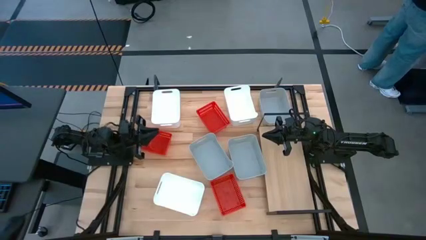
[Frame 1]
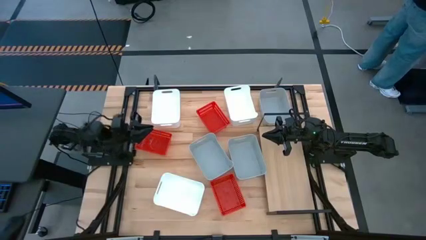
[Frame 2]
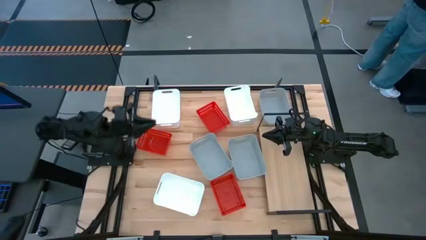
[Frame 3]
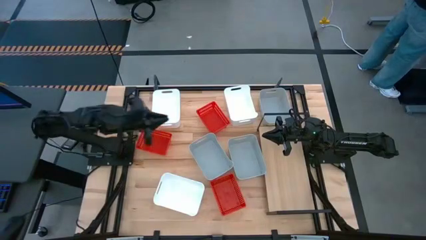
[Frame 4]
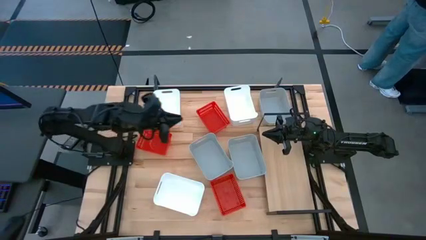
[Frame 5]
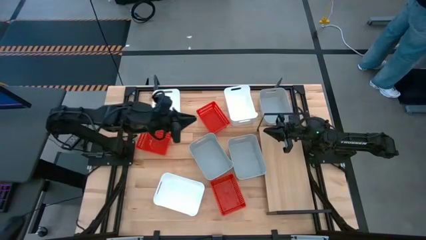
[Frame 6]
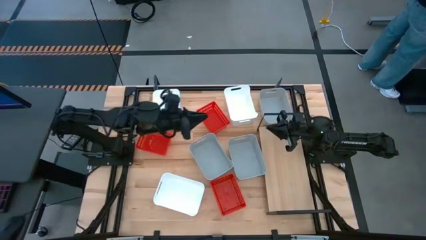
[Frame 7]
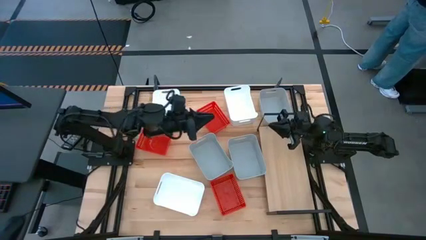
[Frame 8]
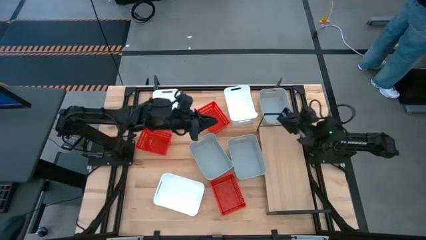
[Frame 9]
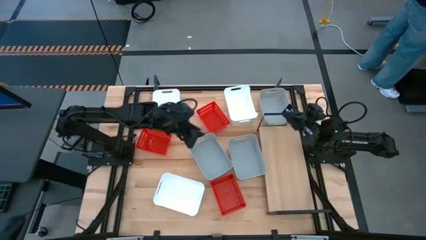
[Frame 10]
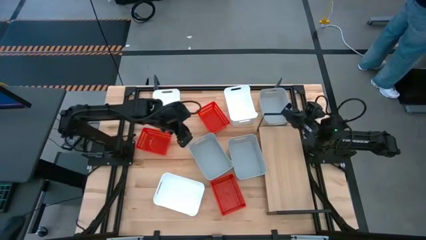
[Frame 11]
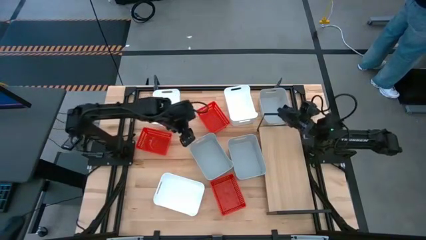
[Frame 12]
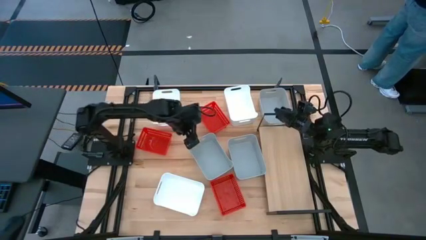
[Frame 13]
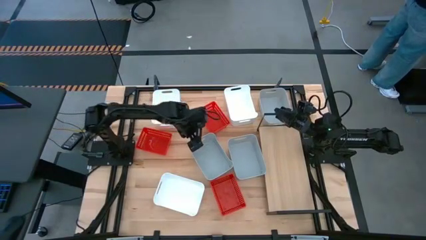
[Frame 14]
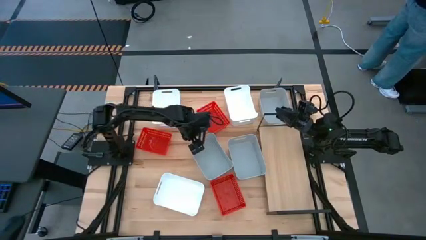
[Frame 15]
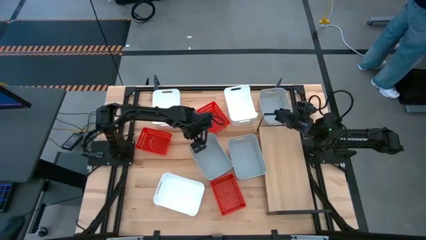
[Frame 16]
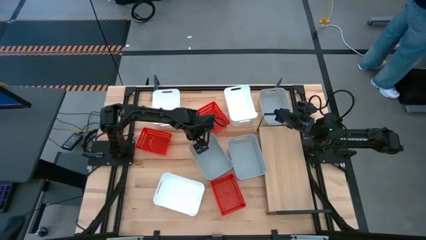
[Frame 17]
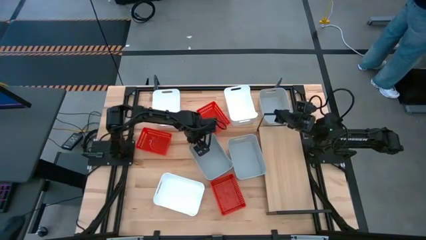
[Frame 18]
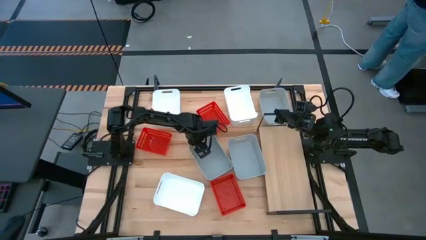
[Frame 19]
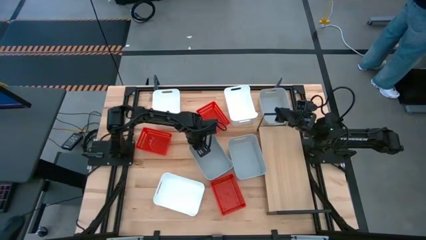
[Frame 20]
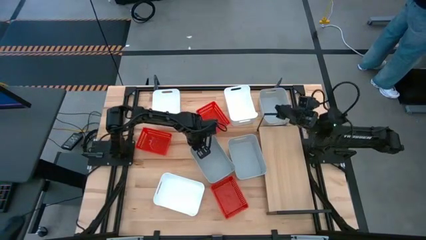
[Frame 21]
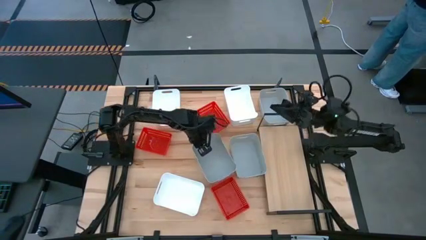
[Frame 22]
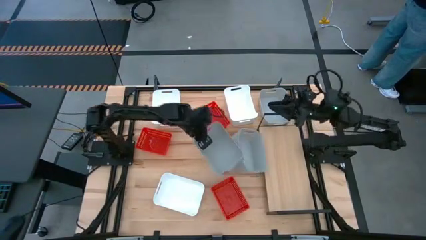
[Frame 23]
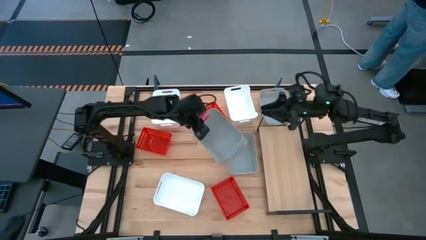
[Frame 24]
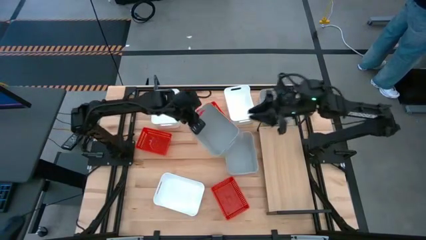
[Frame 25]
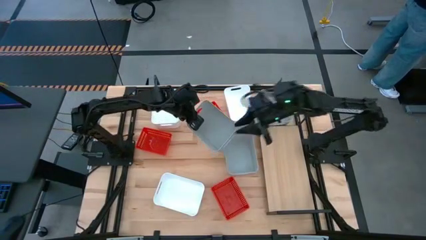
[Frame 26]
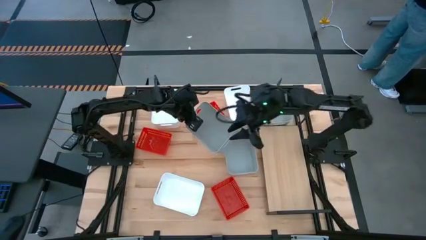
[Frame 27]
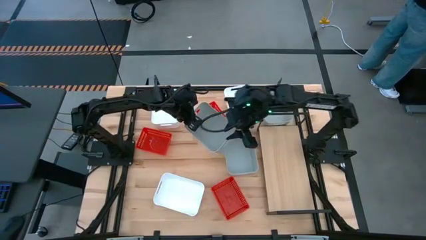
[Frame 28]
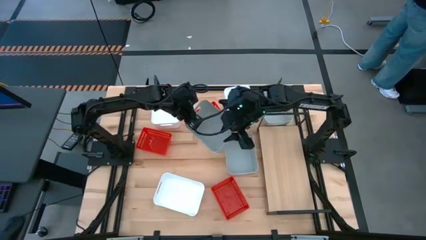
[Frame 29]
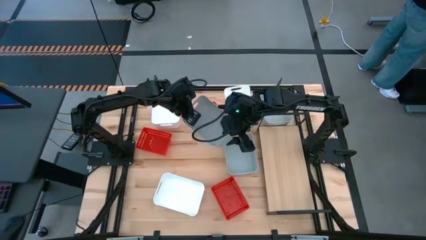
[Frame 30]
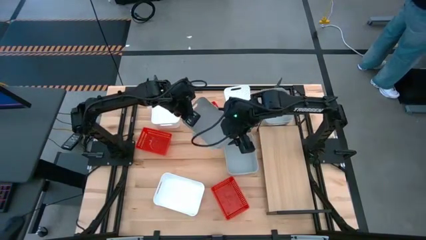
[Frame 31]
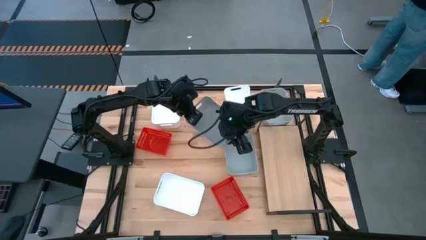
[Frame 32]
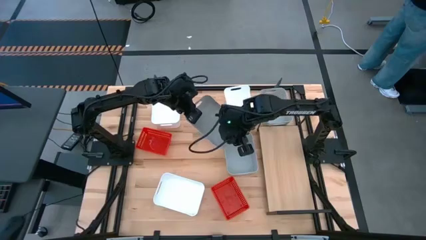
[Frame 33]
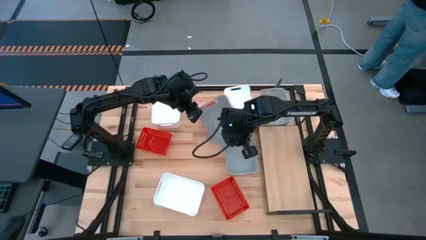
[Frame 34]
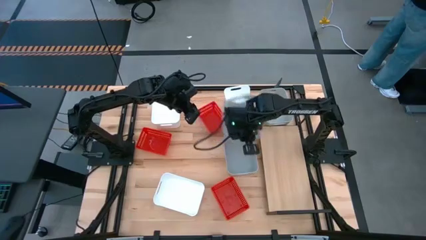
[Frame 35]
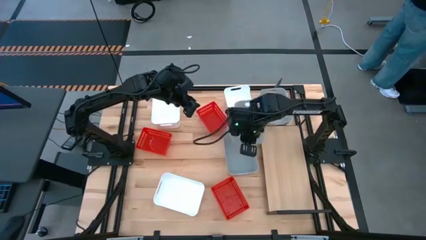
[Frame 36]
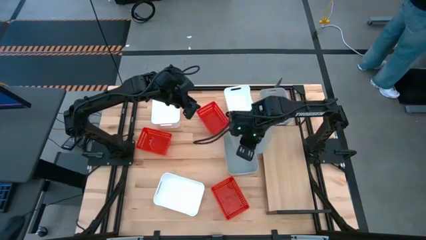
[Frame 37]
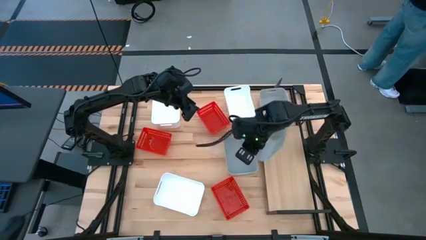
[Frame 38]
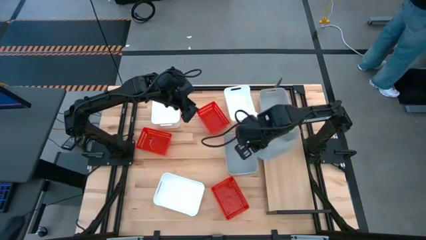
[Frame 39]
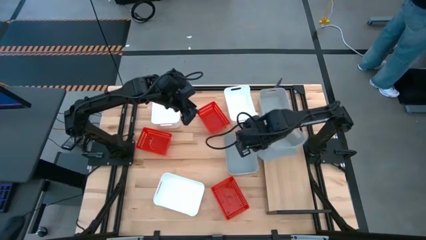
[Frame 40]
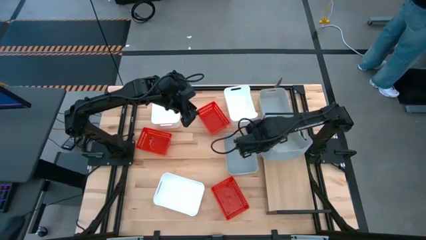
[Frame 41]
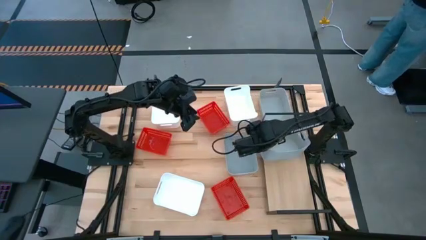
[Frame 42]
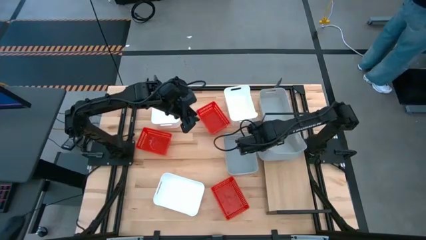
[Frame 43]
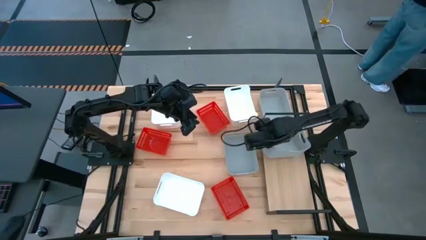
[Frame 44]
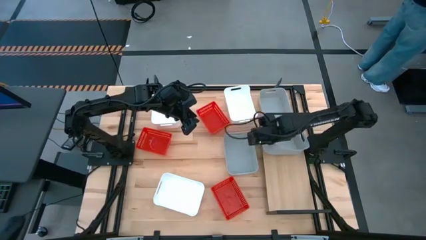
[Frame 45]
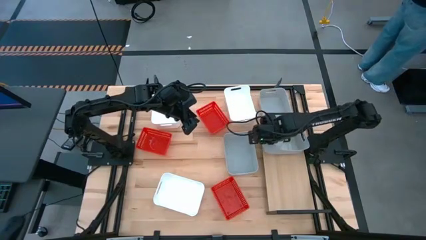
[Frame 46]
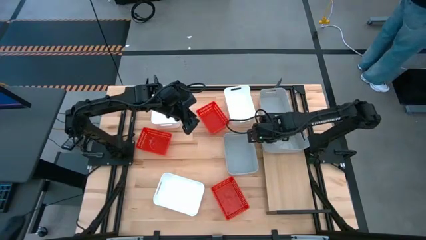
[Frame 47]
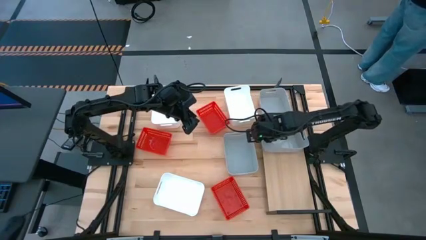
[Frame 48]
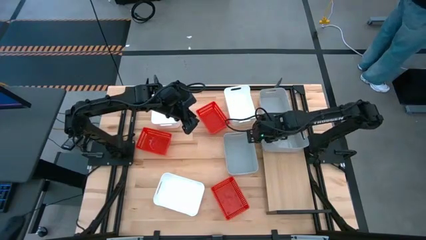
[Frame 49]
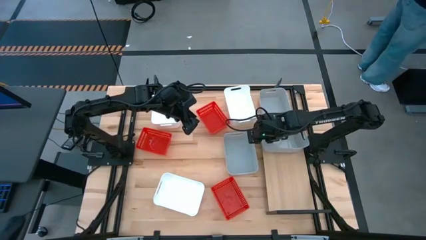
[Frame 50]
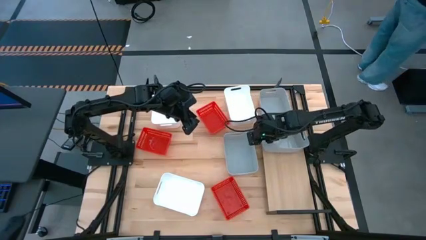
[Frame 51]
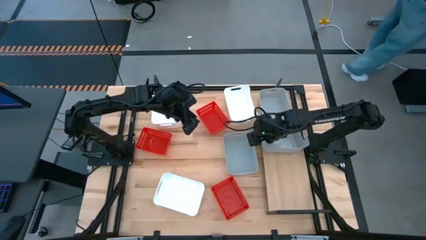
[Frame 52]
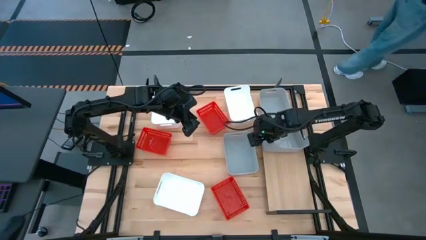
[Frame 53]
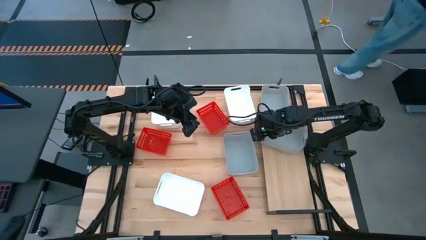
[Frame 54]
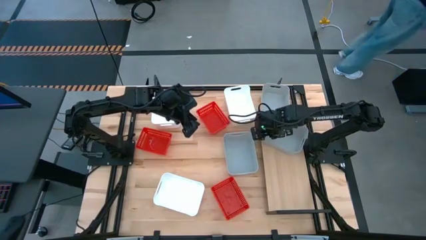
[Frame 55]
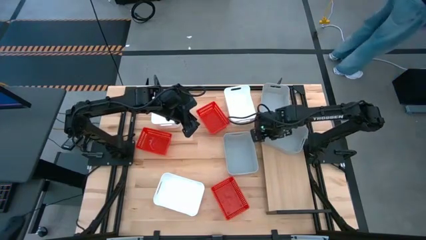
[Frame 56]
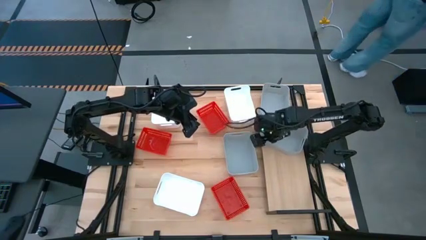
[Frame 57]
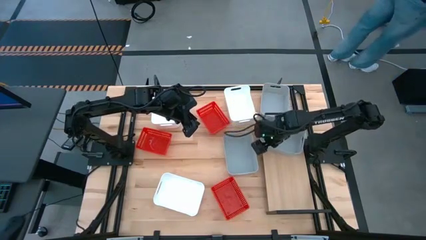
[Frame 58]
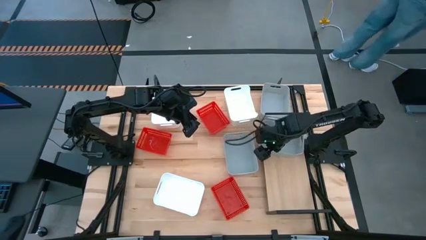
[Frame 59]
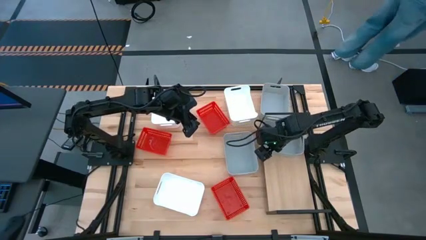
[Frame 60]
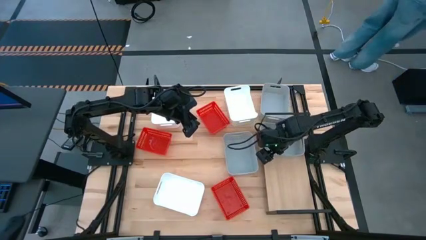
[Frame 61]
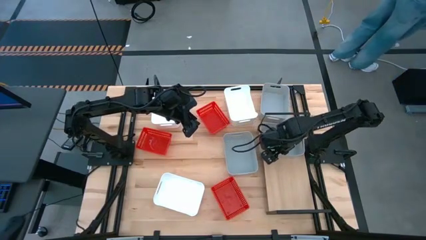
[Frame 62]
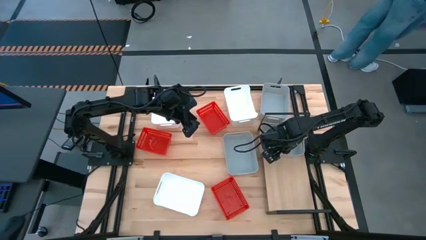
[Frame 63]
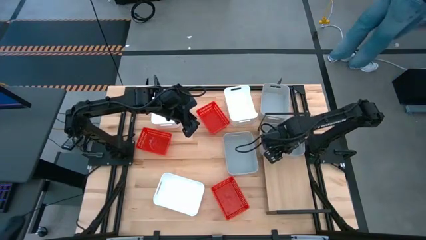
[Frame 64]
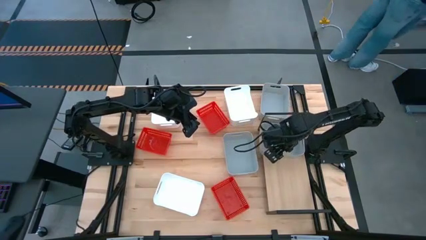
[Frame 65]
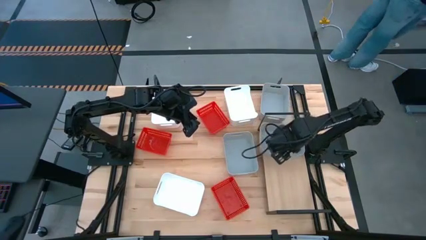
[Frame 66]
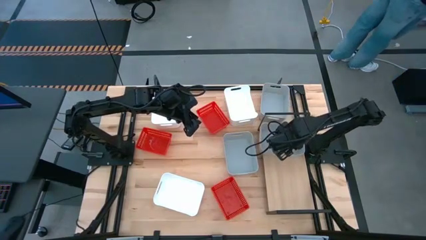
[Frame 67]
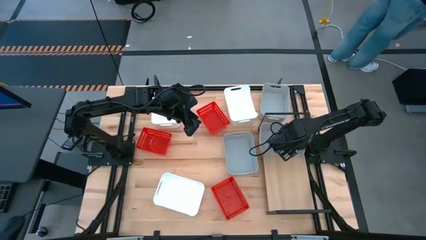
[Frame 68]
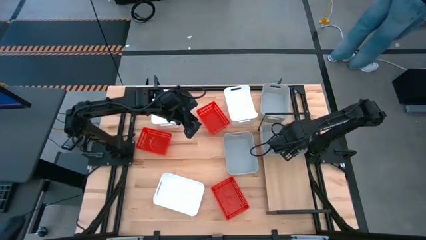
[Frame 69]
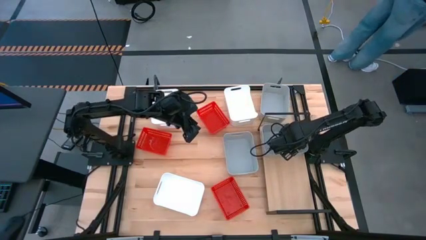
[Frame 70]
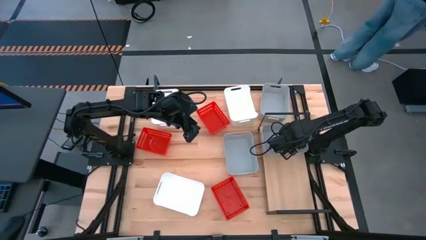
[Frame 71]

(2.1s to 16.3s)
Task: Stack baskets on shelf by color
Put the bottom left gray bin on the shelf
